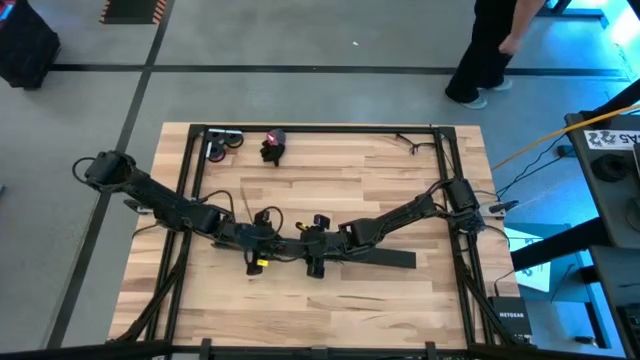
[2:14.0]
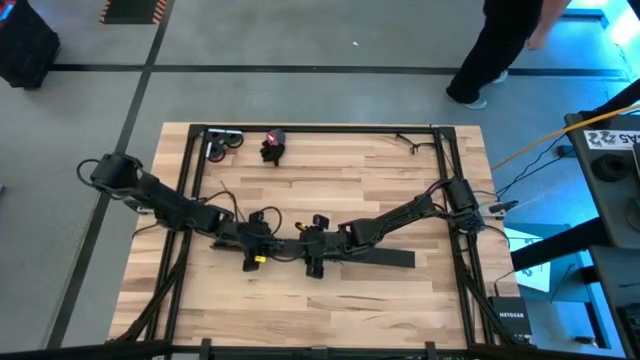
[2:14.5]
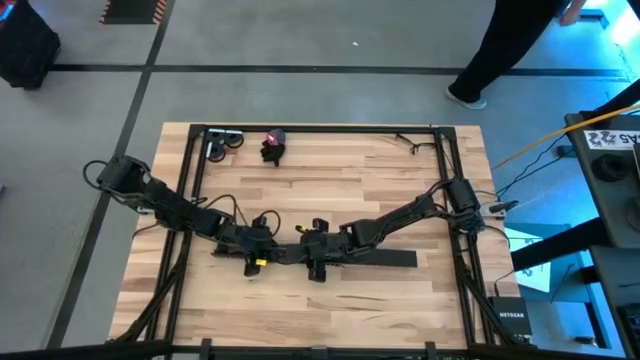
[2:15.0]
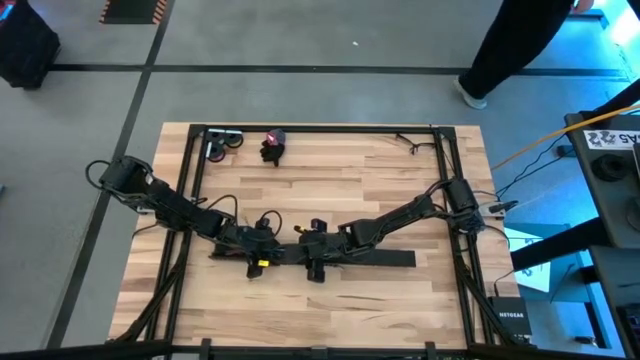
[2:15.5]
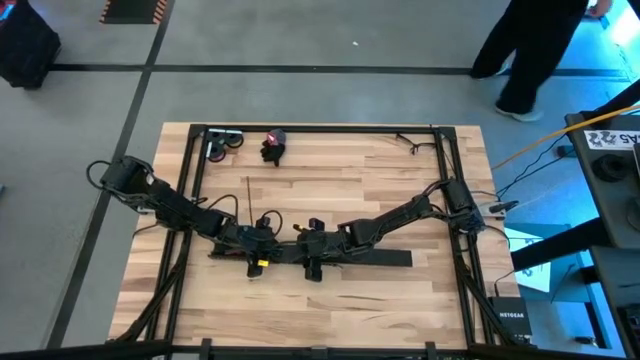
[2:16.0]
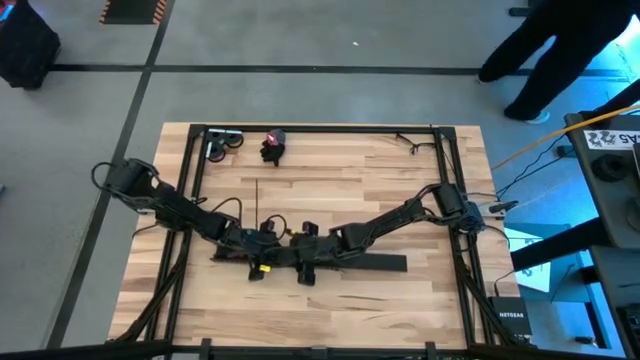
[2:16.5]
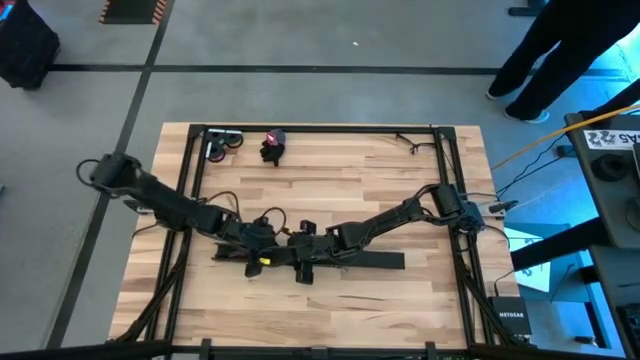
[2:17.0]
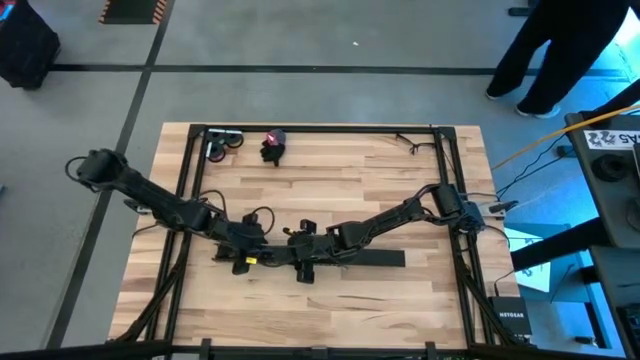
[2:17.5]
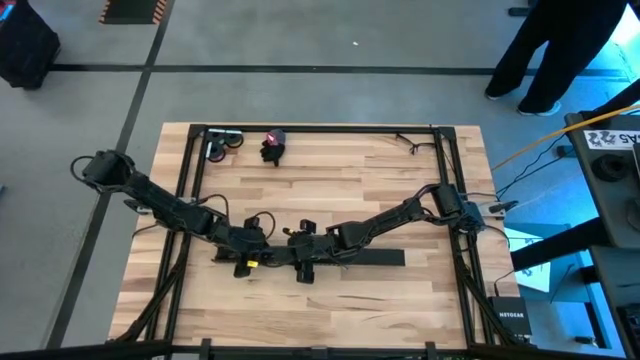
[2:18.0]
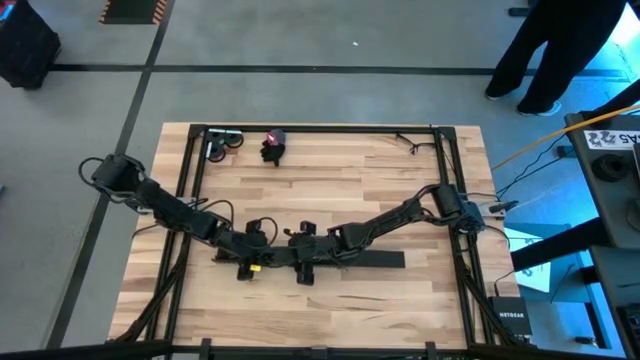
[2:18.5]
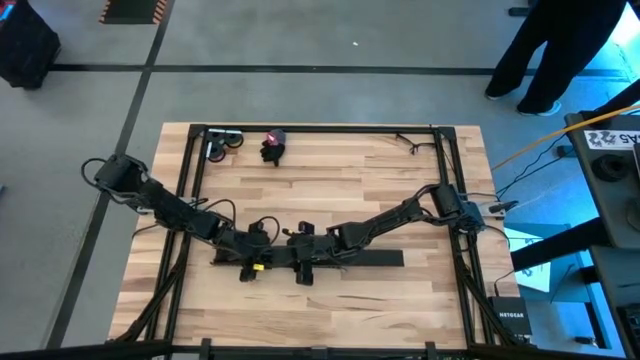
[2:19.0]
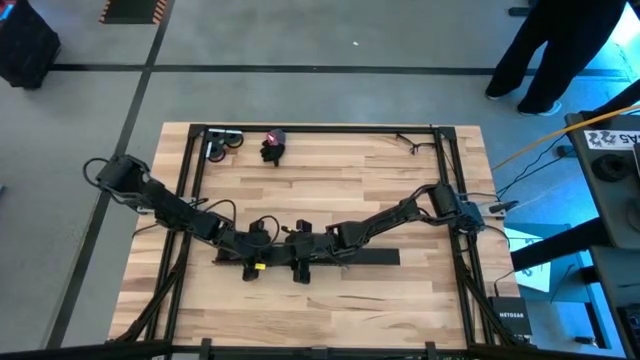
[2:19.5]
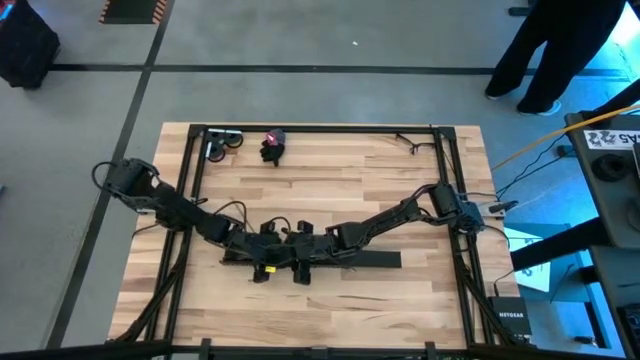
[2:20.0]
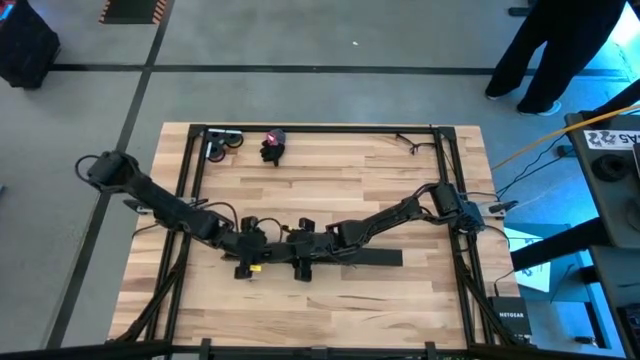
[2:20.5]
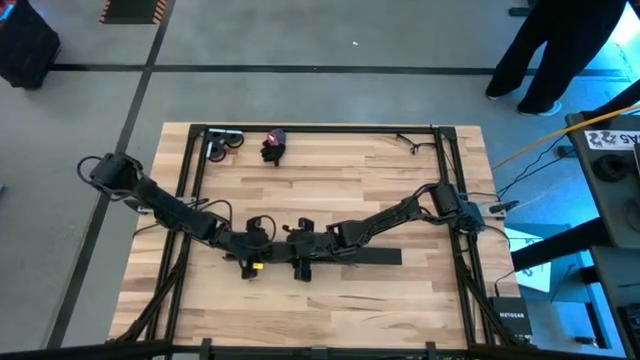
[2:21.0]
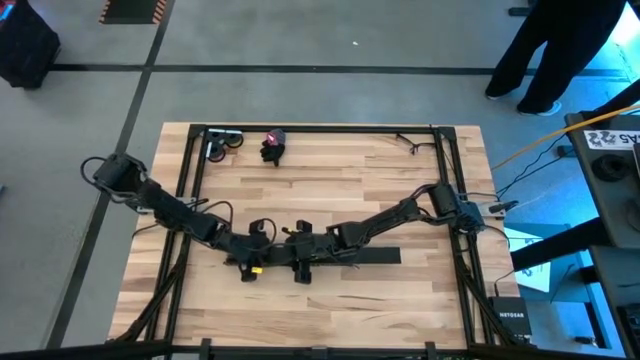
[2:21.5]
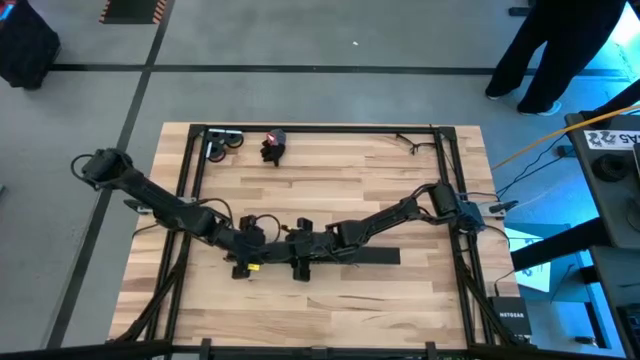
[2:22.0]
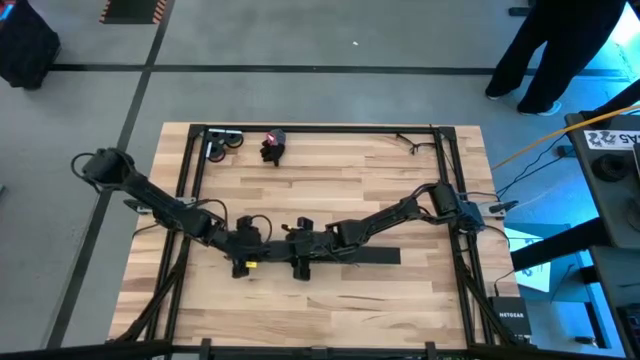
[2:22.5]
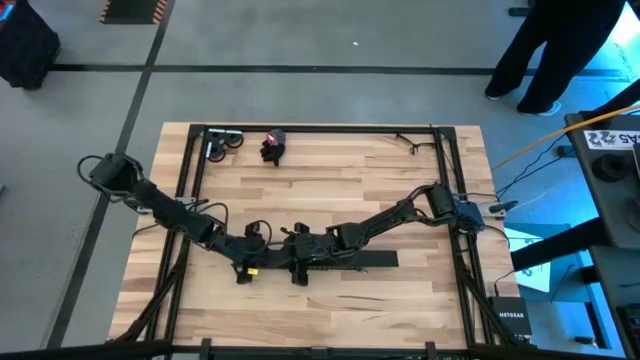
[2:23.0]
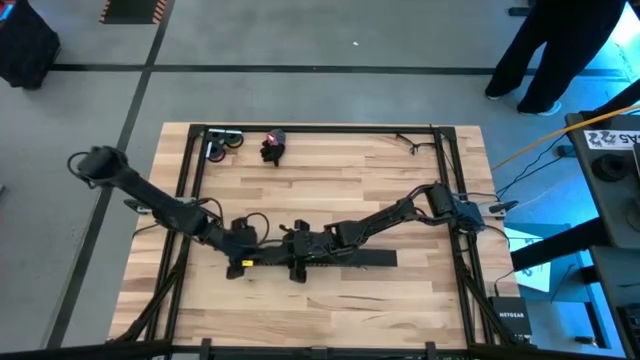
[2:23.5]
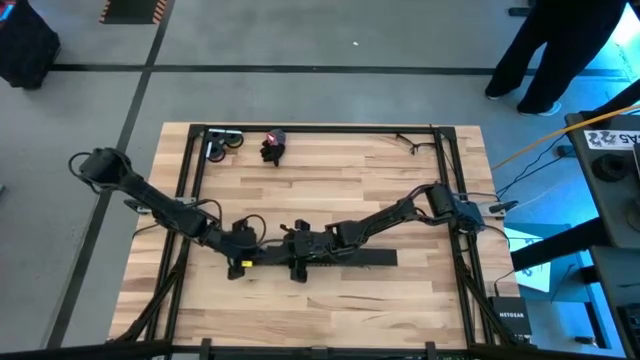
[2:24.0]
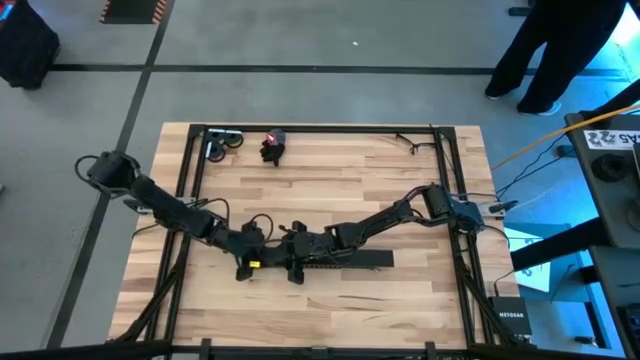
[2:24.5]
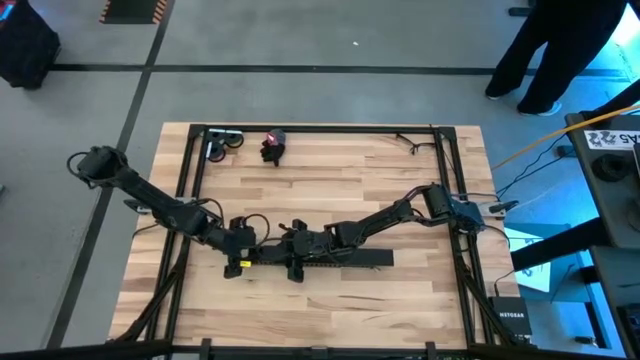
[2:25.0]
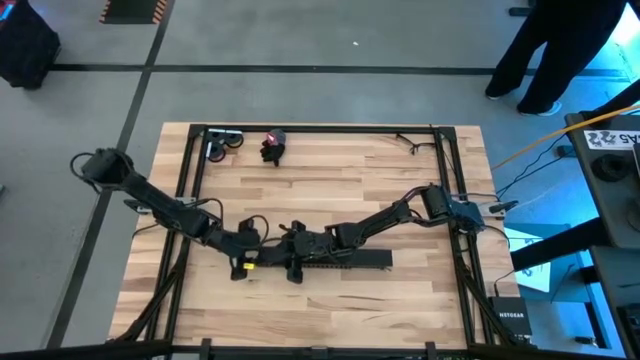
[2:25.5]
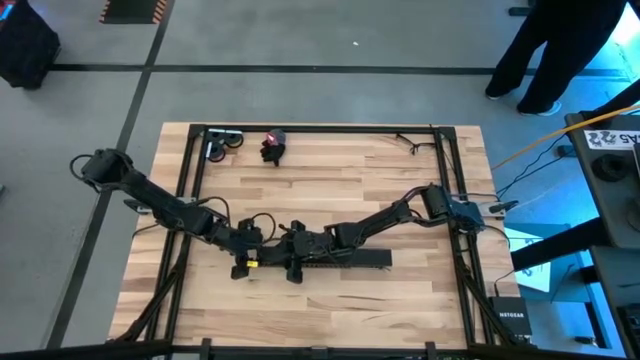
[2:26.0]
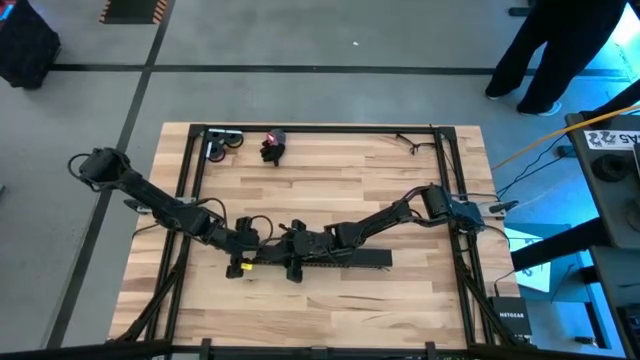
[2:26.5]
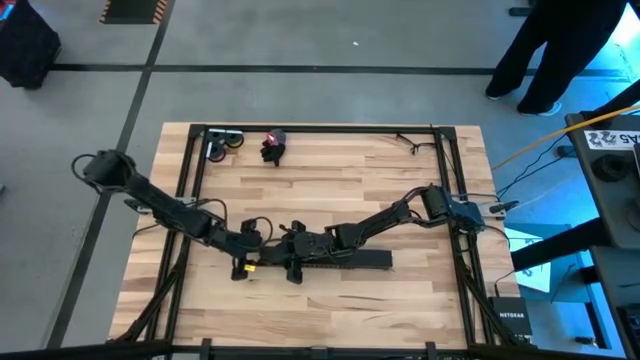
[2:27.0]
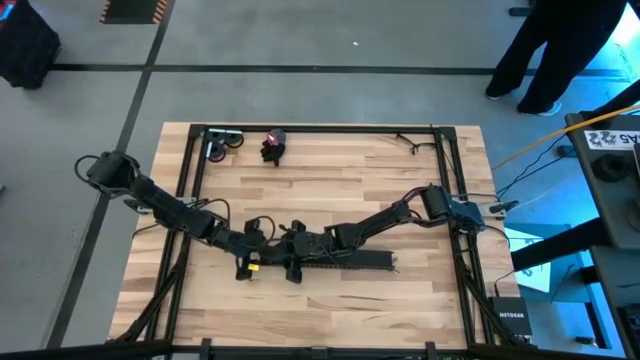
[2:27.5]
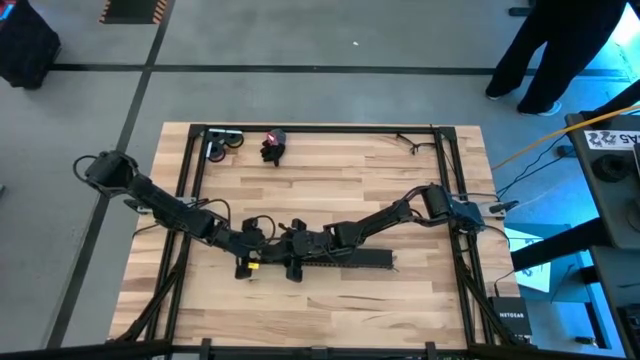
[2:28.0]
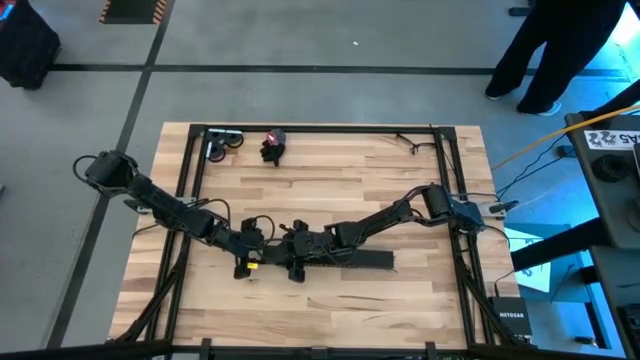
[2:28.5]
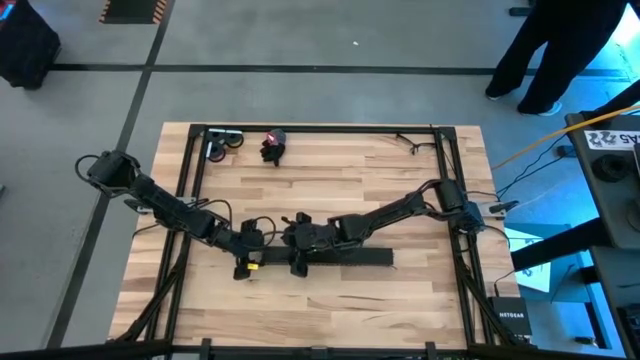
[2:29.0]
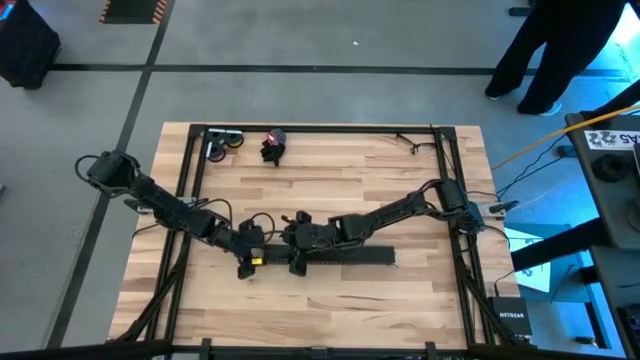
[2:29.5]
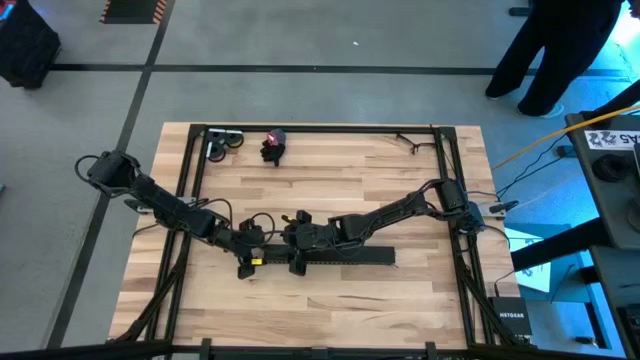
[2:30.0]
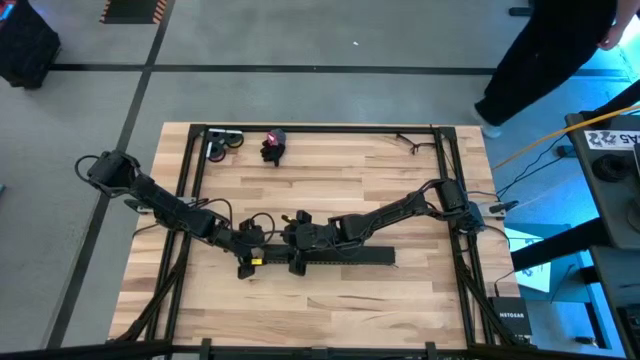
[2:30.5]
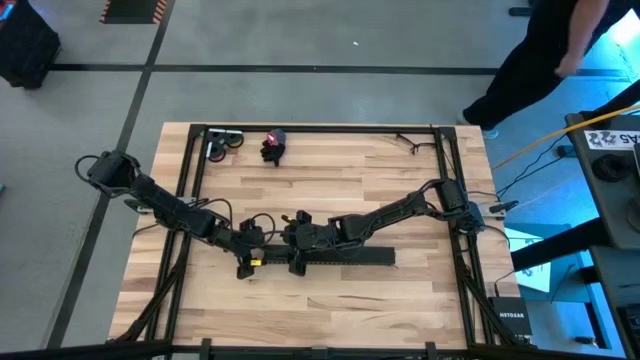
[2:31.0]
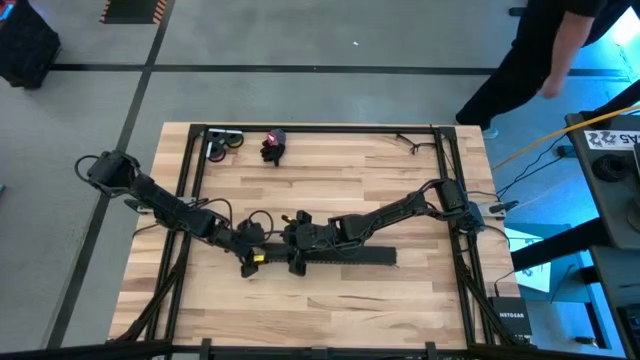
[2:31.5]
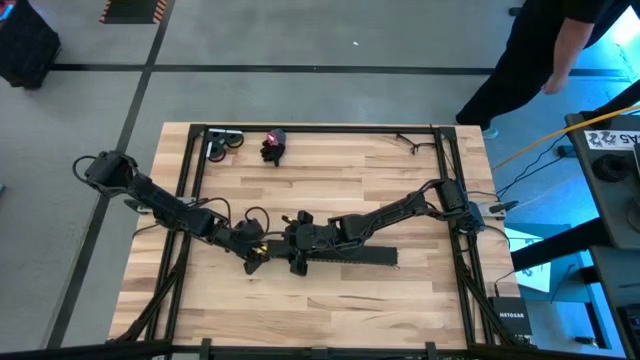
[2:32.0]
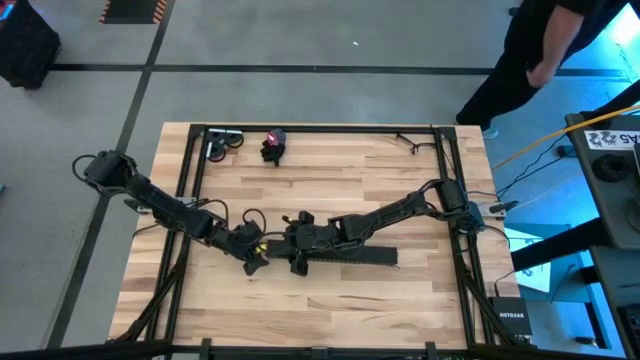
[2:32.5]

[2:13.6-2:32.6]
Task: Ziptie cables
Close the black cable duct
